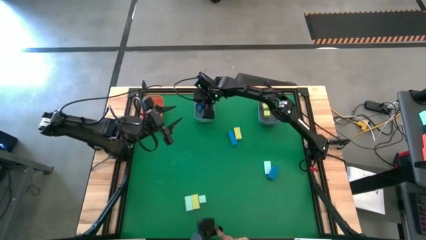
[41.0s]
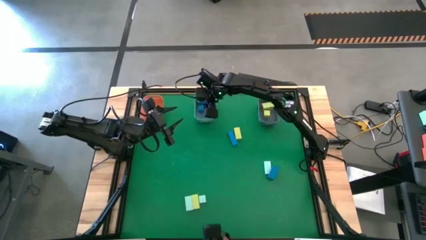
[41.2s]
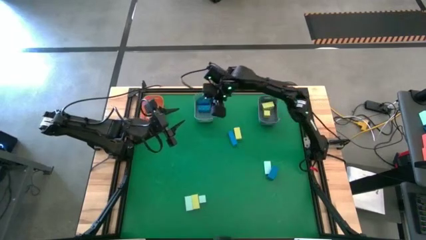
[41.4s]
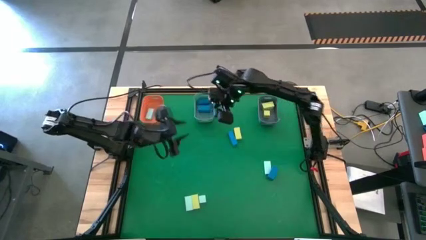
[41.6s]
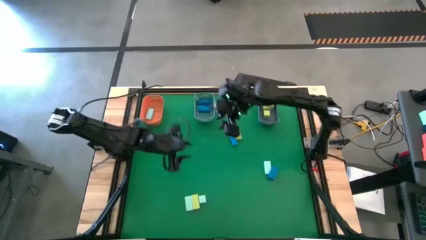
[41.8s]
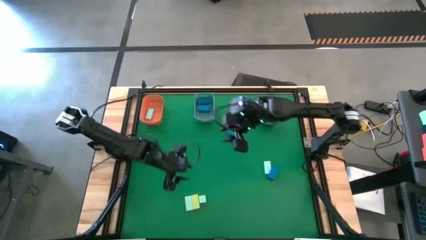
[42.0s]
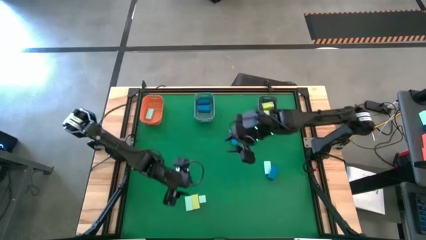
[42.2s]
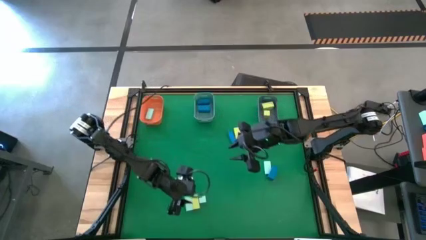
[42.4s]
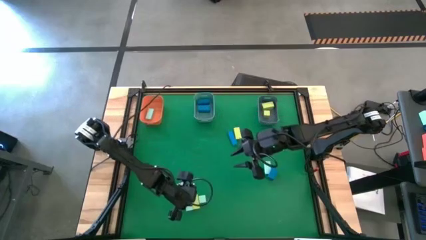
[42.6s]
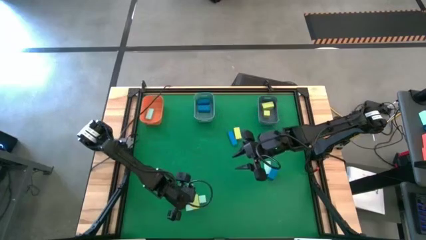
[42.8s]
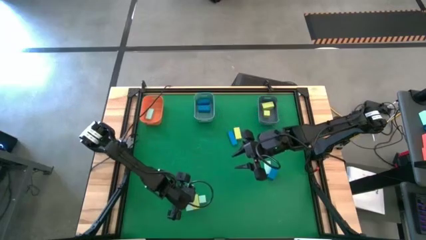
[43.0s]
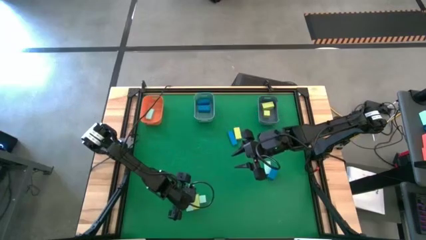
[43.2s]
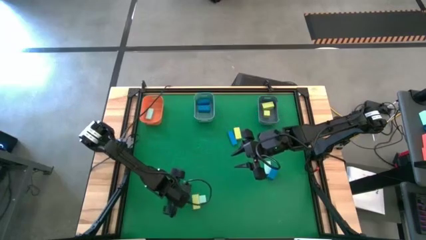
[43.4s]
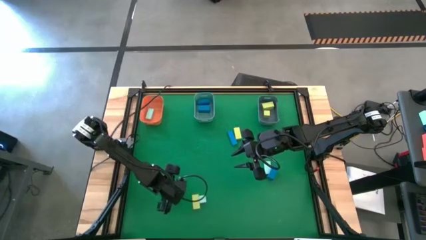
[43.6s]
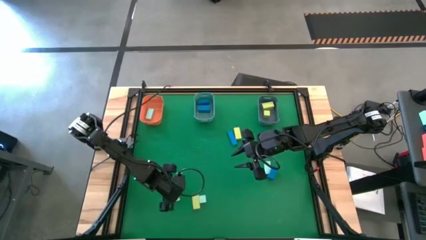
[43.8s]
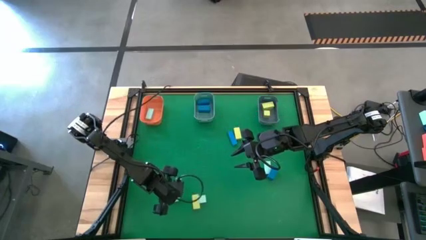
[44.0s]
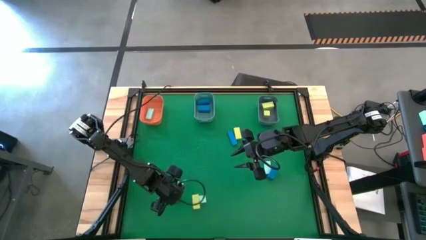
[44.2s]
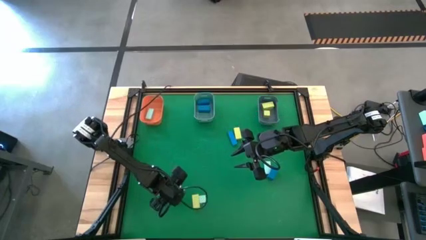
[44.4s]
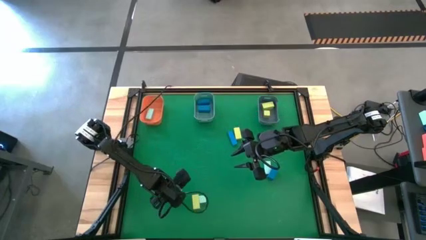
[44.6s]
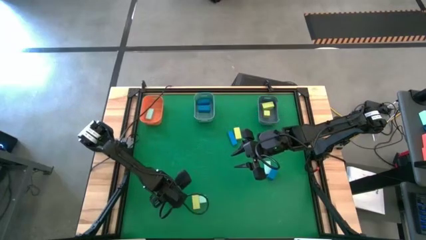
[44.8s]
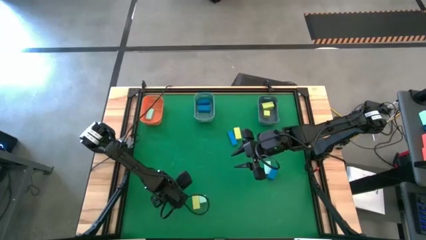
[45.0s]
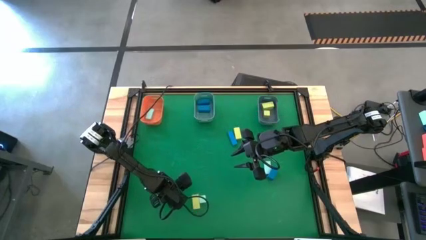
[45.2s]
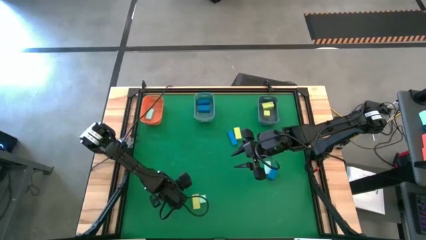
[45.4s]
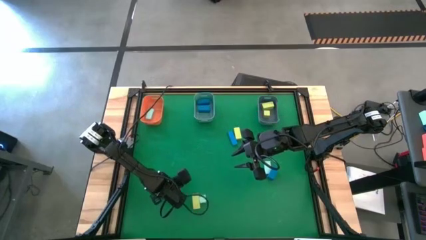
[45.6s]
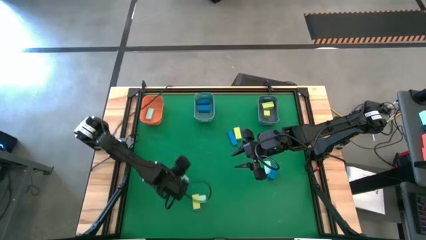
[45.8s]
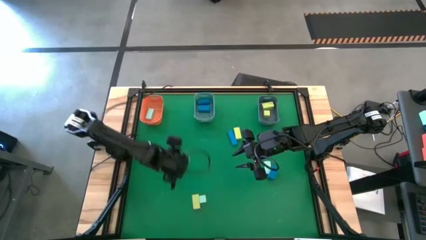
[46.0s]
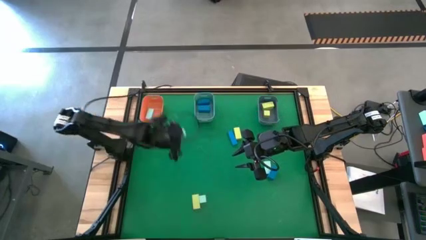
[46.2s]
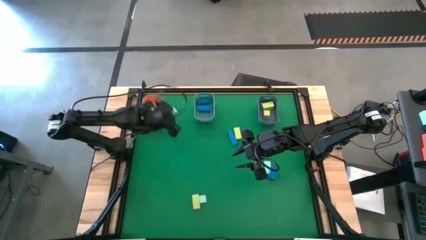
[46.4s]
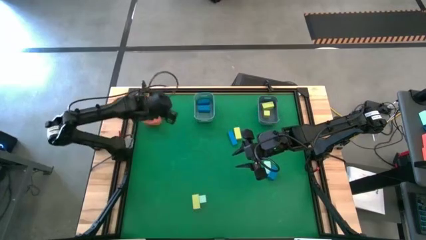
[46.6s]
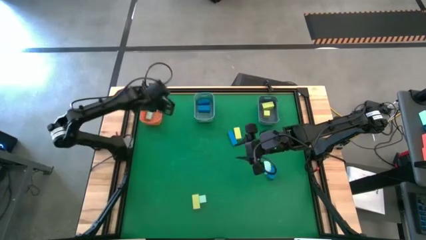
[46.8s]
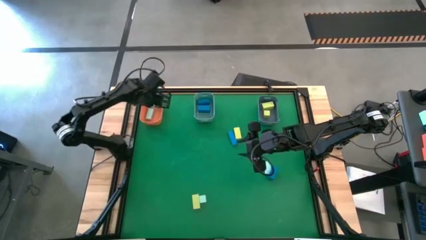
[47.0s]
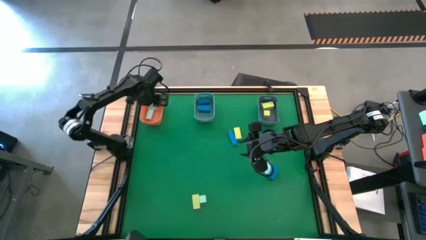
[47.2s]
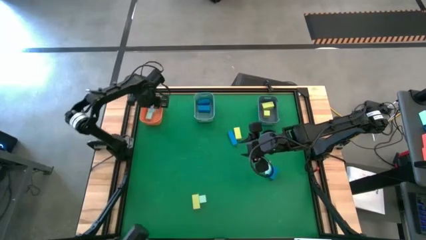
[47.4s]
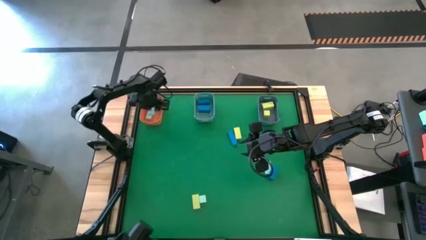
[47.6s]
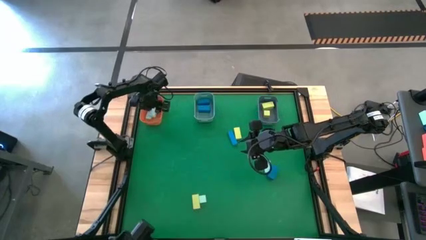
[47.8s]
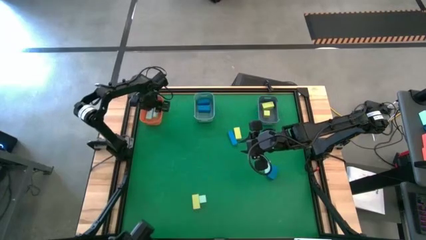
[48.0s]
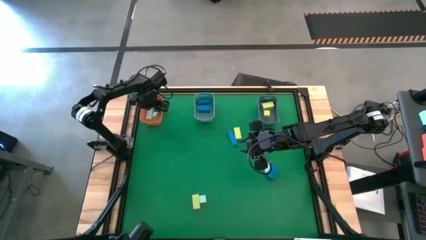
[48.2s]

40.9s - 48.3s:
Task: Sort & place blocks by color
Put the light blue block into the orange bin

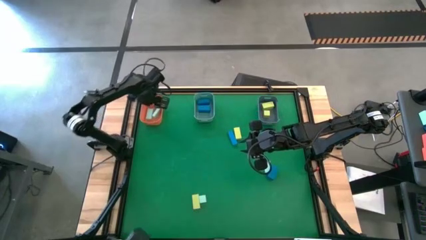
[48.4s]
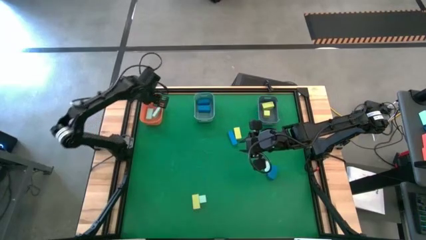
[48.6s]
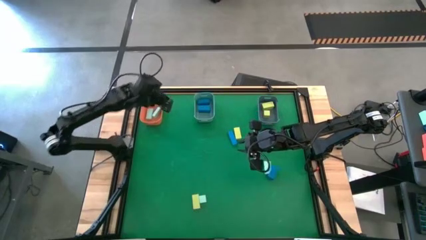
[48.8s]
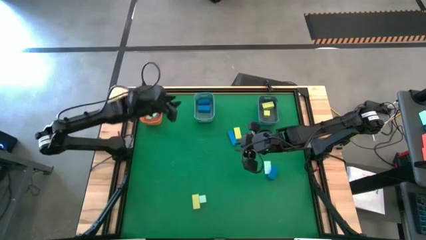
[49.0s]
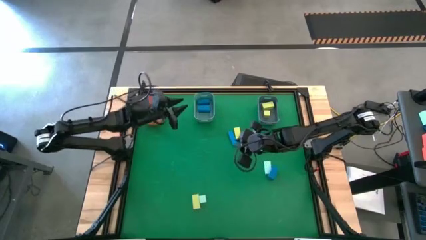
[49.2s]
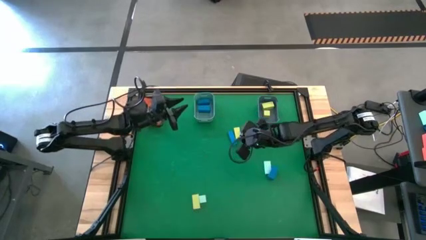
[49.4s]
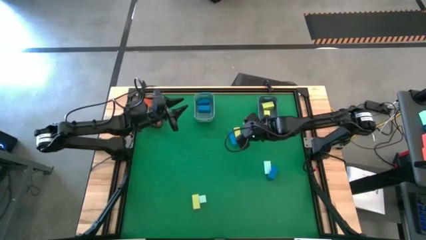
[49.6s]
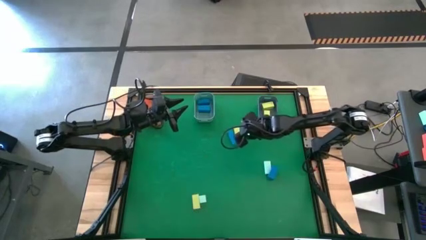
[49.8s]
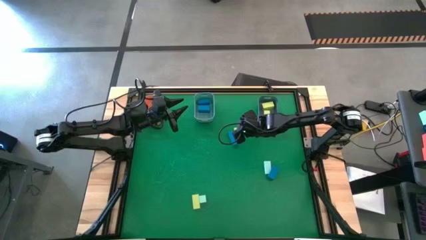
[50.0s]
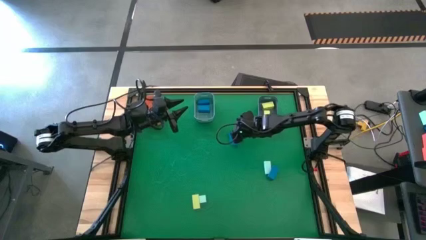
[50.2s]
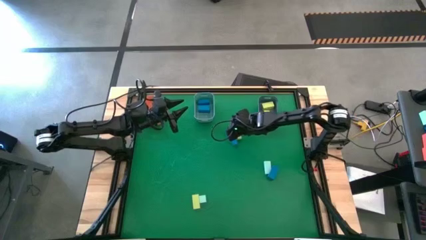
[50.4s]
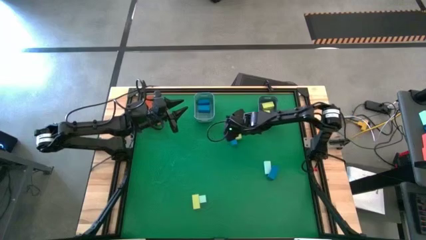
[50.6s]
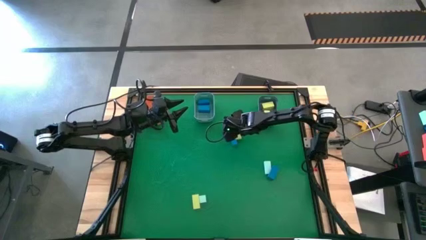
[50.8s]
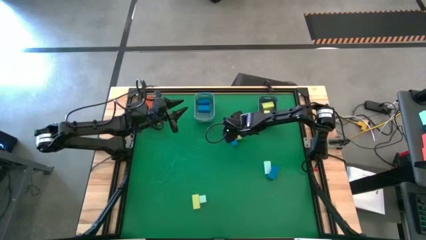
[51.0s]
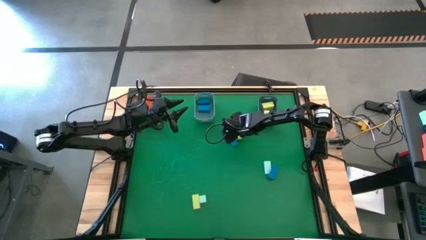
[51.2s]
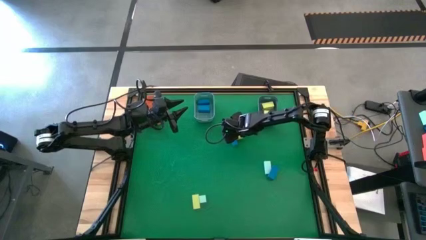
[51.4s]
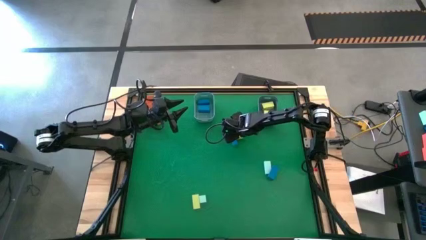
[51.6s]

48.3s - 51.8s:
Put the yellow block into the gray bin

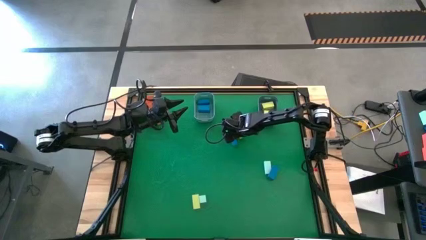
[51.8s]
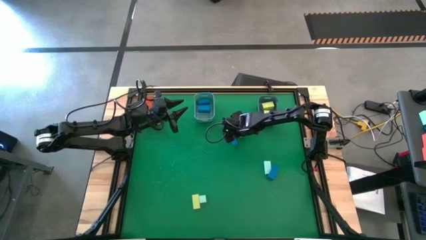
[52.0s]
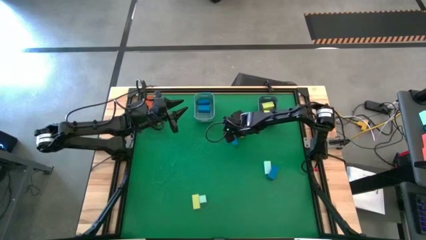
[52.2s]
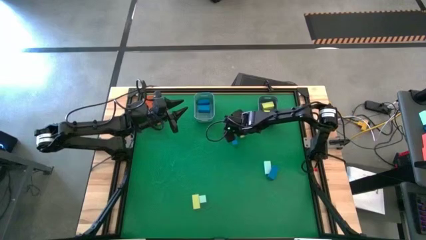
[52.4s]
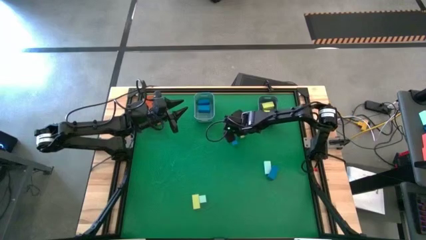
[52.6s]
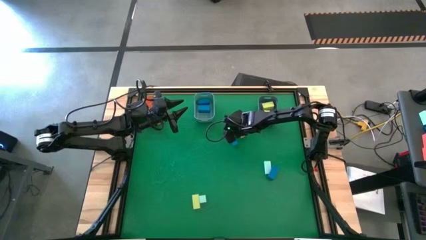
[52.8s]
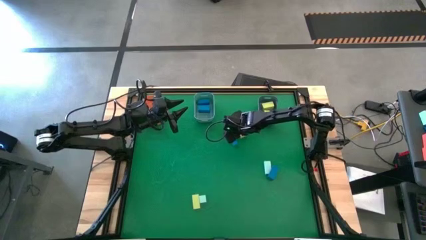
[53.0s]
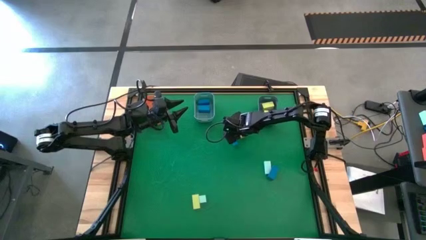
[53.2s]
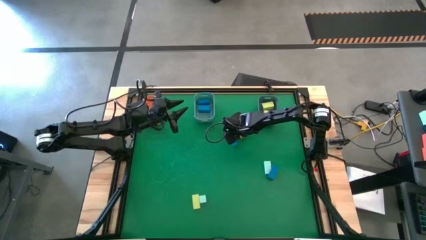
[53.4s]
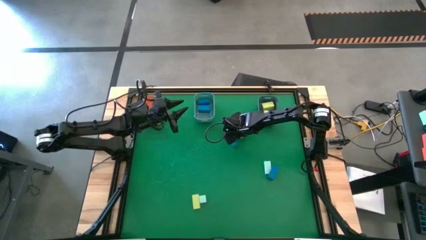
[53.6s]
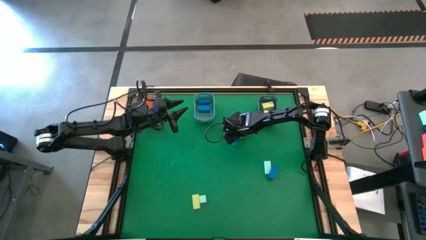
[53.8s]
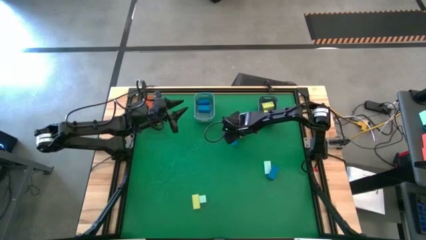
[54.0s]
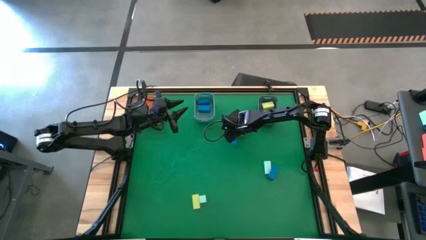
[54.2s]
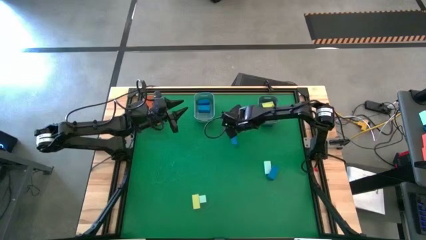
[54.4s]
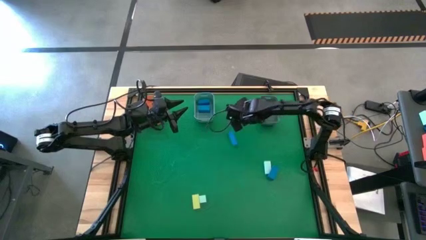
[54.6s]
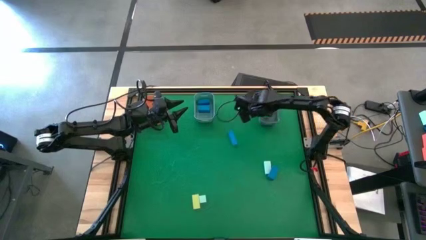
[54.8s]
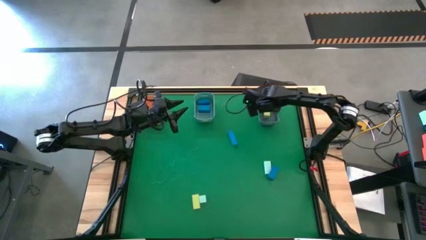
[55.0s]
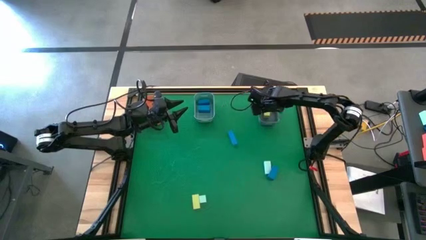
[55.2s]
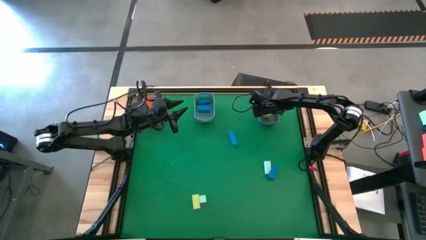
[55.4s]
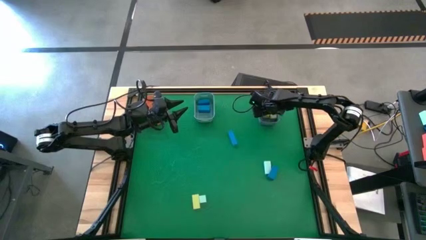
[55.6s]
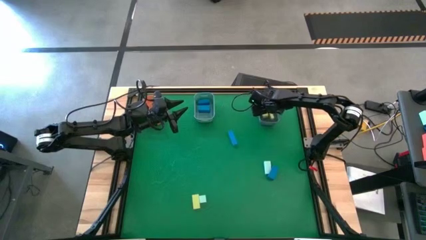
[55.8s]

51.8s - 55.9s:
Put the yellow block into the gray bin

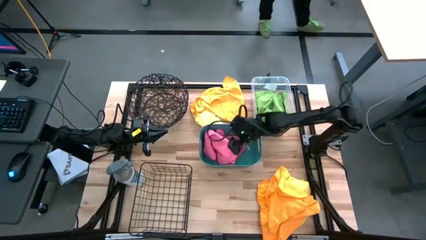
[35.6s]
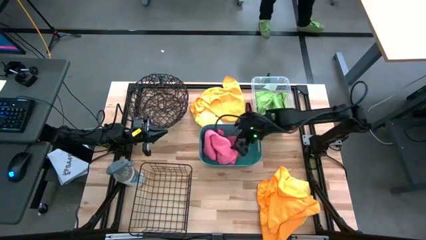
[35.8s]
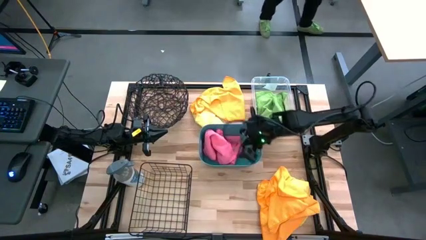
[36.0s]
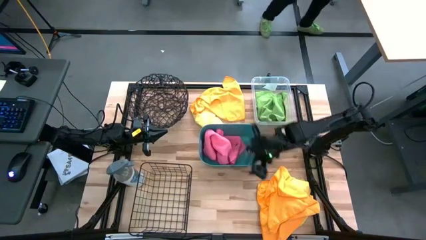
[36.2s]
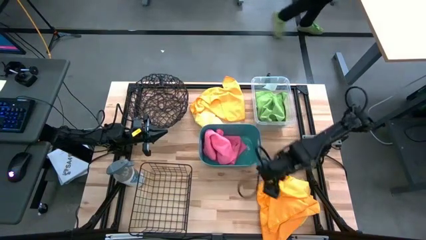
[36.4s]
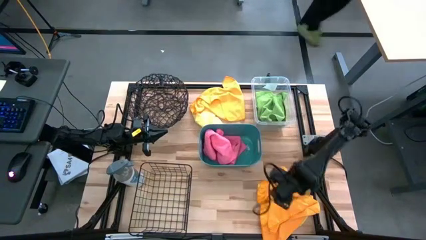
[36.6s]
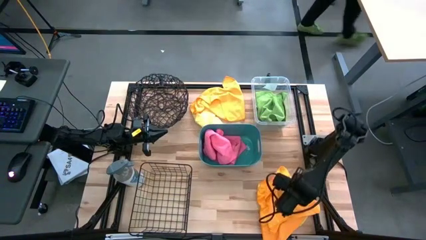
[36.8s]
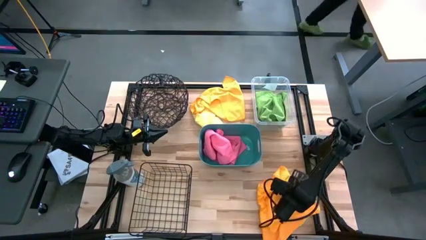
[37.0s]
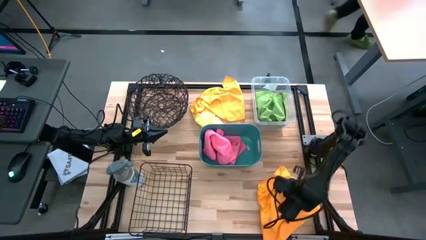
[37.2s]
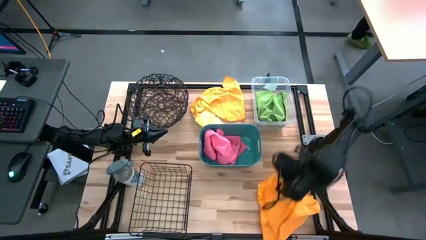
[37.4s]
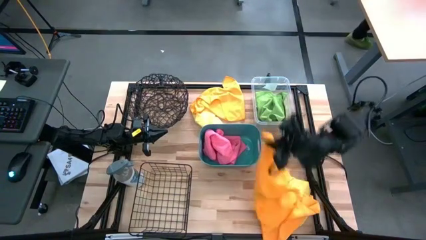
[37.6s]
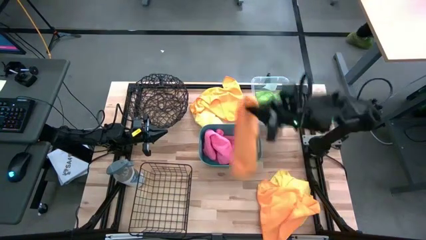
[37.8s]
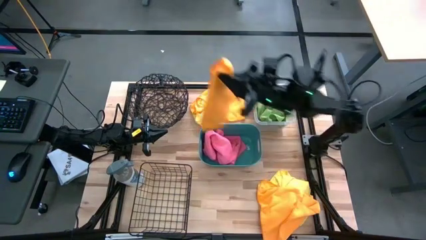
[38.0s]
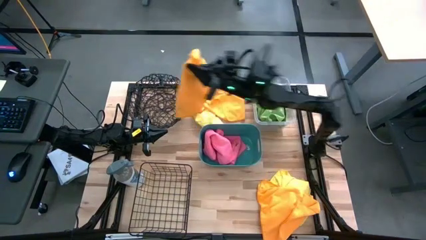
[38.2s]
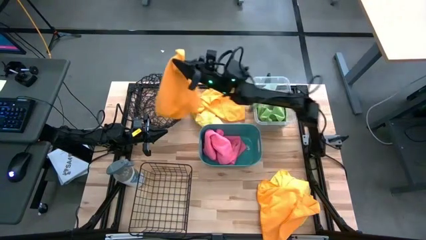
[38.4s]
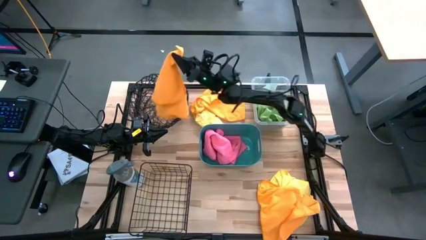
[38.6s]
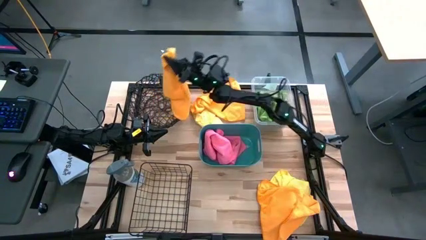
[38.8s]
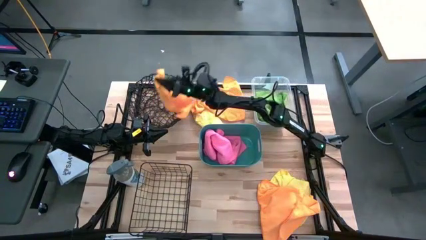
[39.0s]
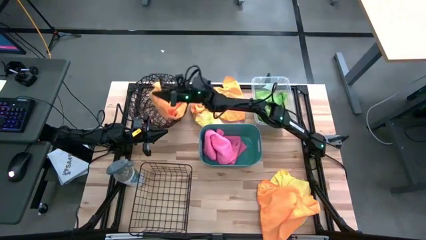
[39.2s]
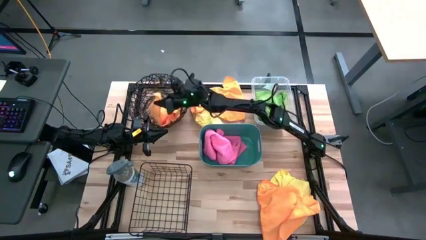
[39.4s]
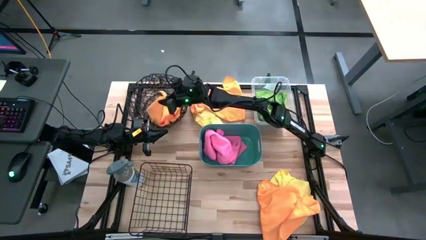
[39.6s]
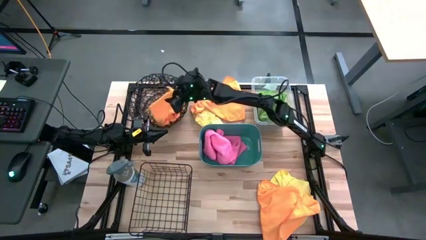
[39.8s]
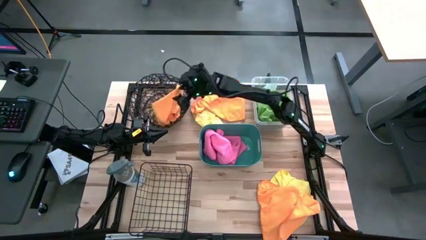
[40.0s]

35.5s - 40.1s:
Task: Sort microfiber towel by color & place in baskets
Put the orange microfiber cloth into the top black wire basket
